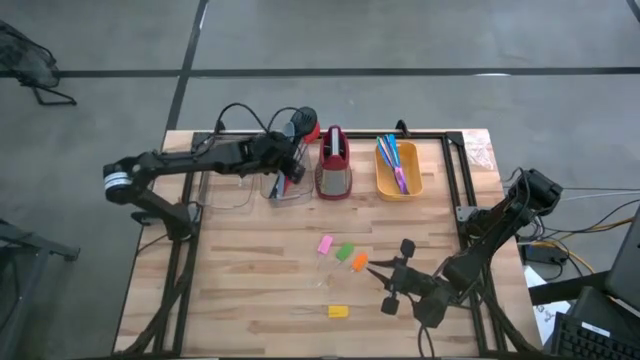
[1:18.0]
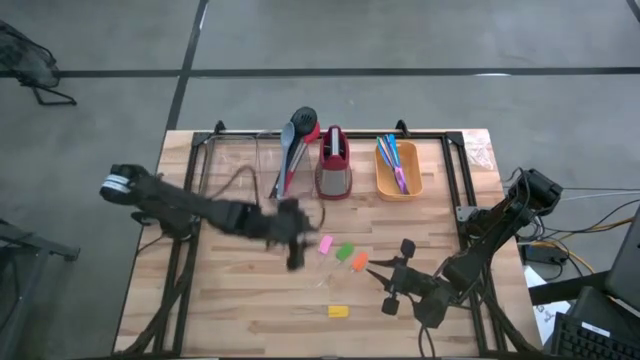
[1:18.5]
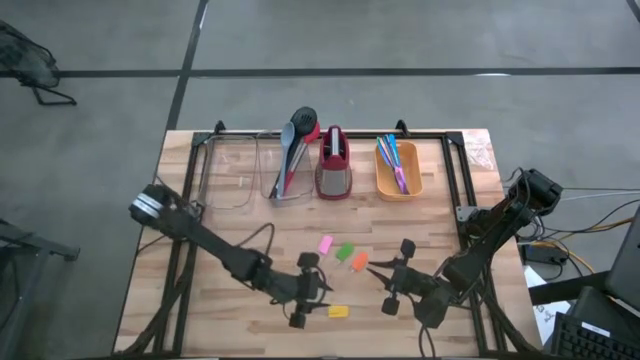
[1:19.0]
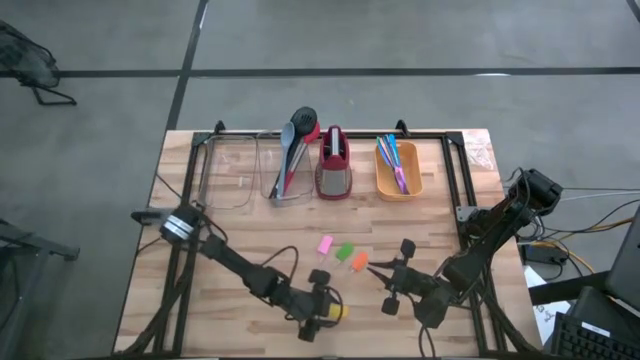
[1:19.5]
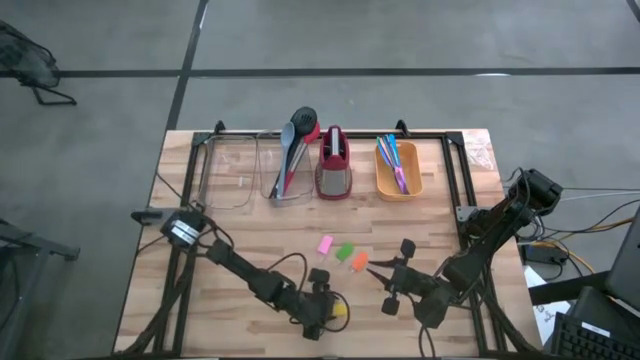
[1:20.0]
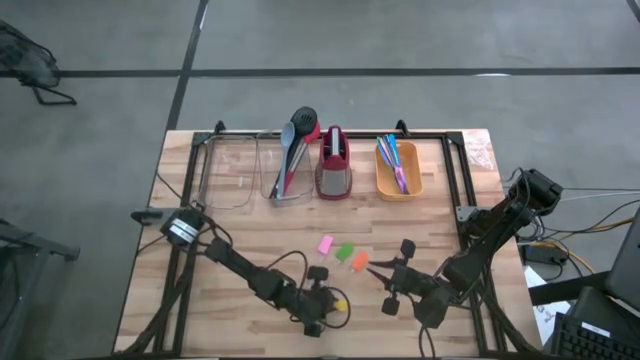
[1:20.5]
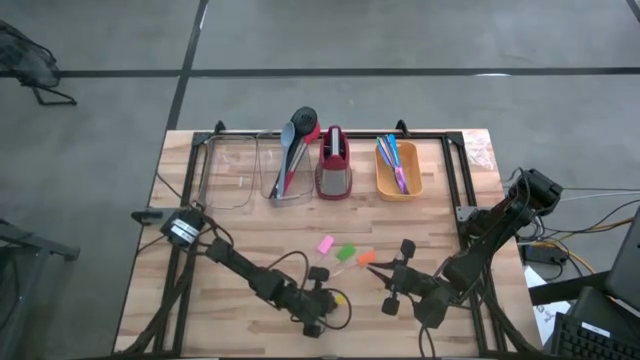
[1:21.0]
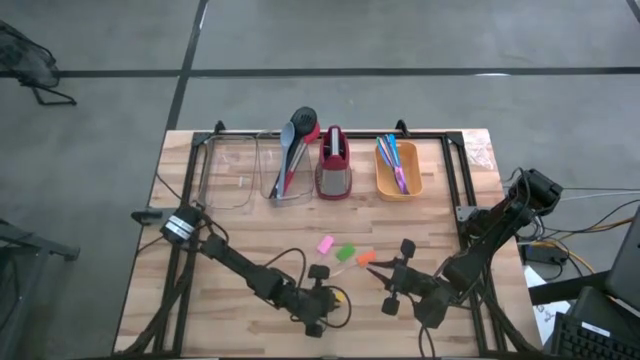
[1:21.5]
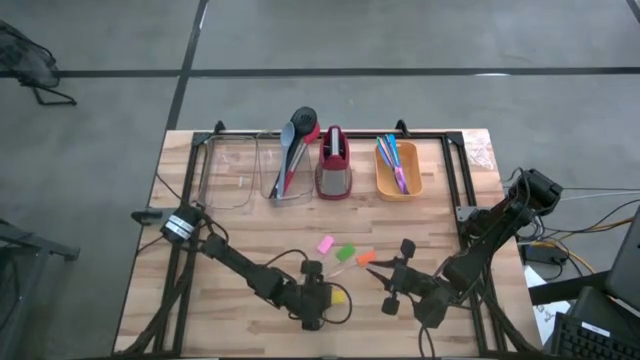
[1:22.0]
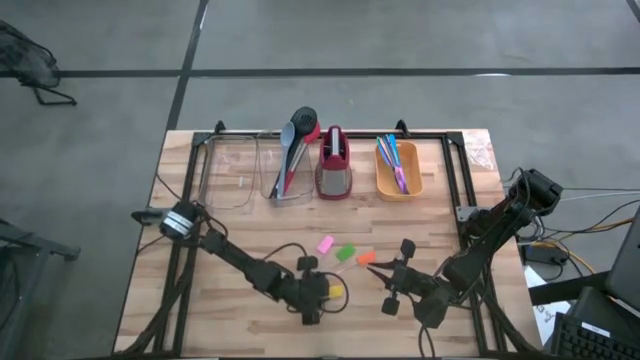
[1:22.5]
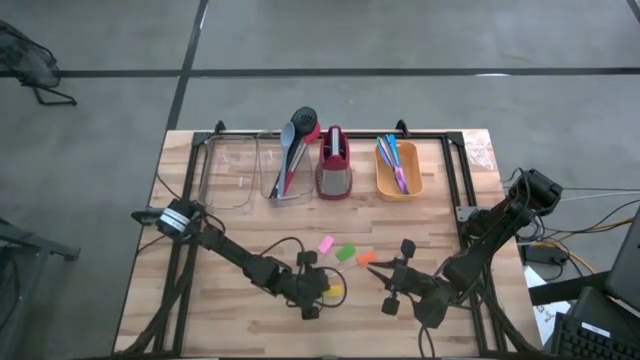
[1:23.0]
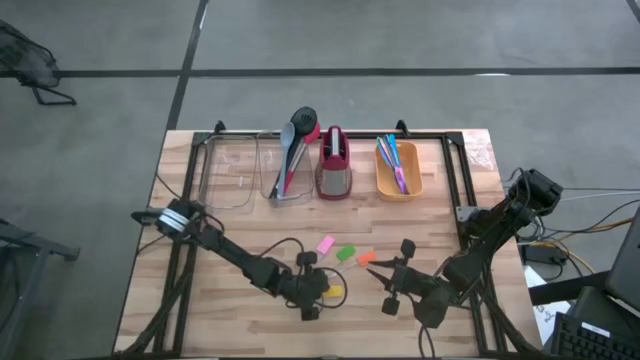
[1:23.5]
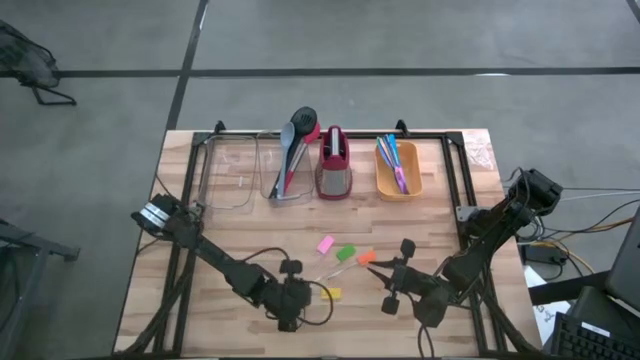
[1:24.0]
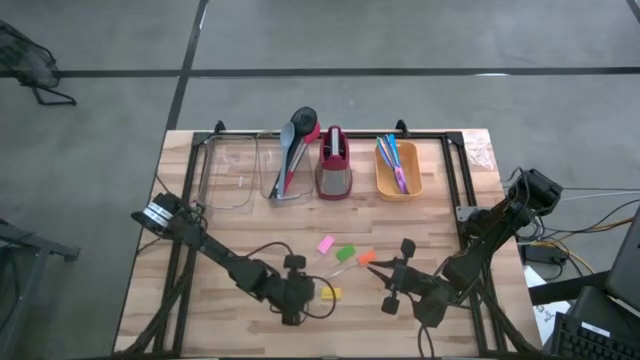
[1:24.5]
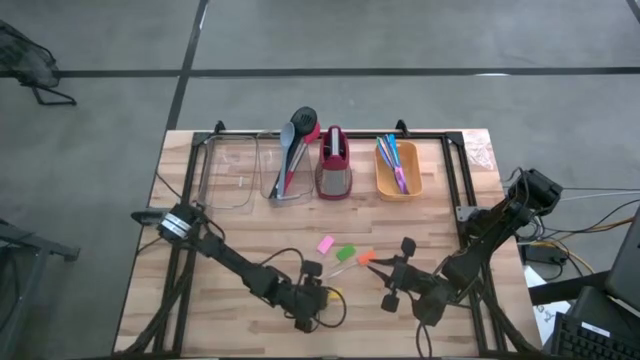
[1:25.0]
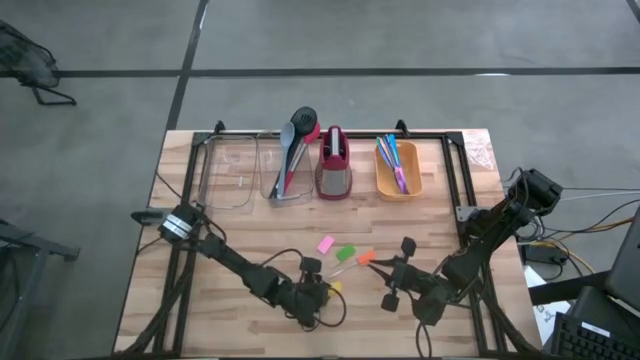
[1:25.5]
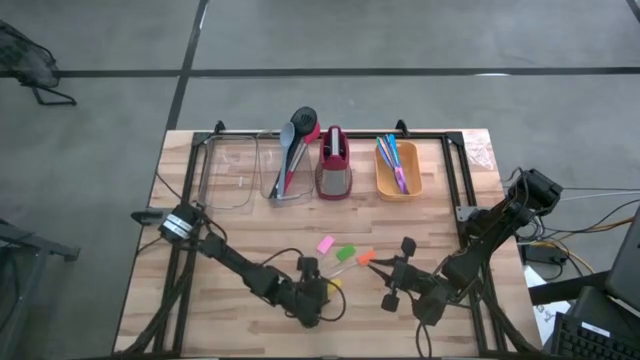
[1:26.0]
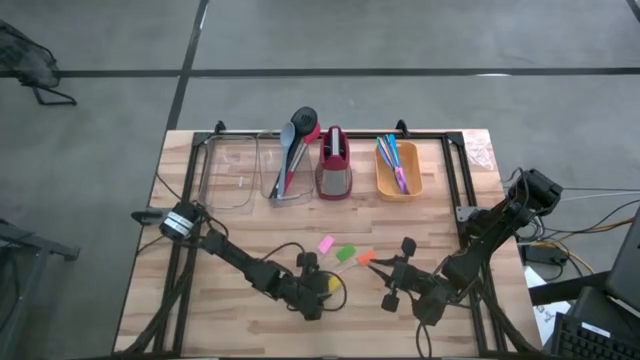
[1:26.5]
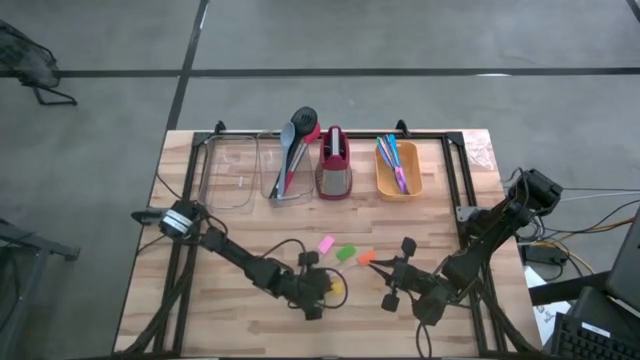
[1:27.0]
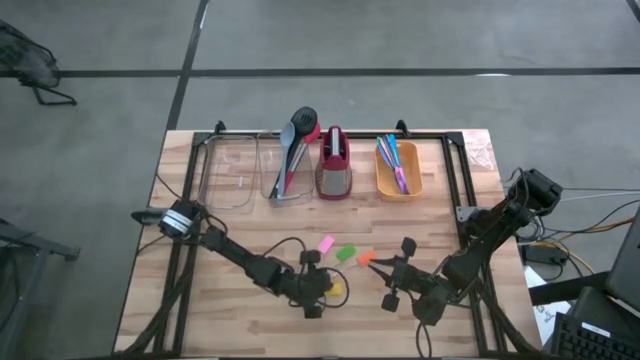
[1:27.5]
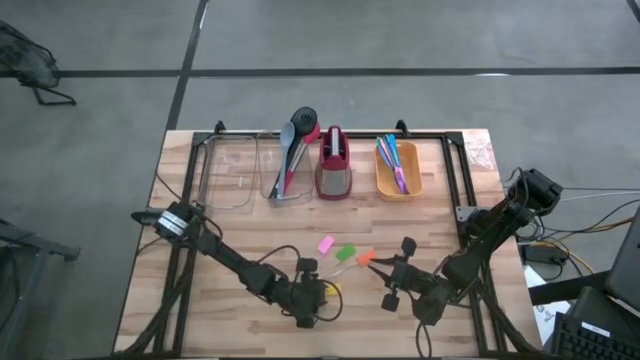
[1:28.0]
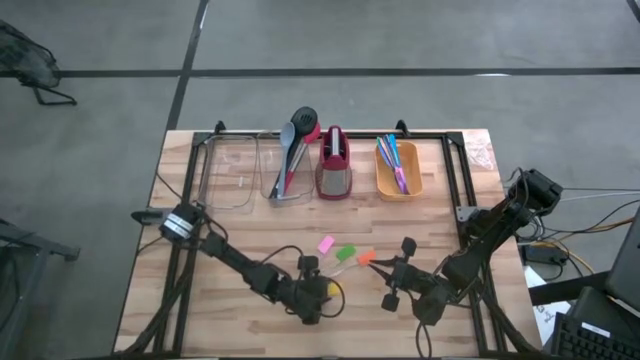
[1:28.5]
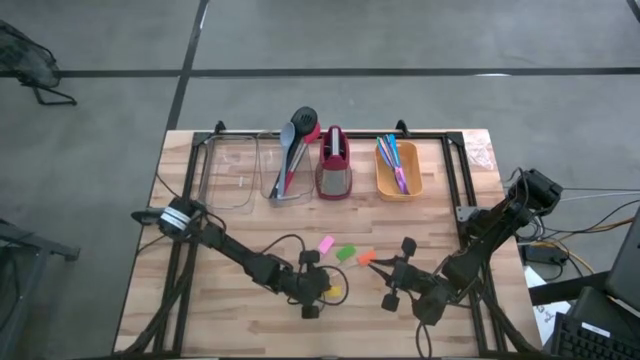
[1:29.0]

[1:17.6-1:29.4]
Task: Pick & Place Kitchen Items
Put the yellow spatula into the left transparent bin

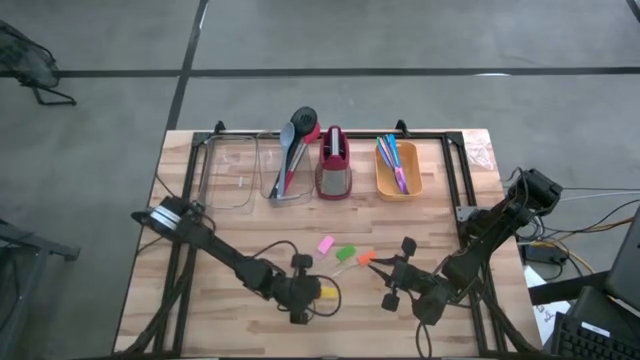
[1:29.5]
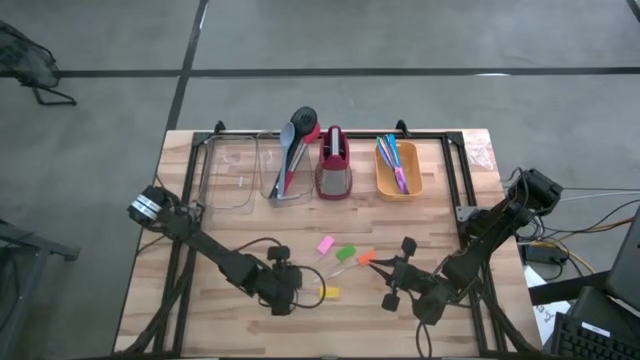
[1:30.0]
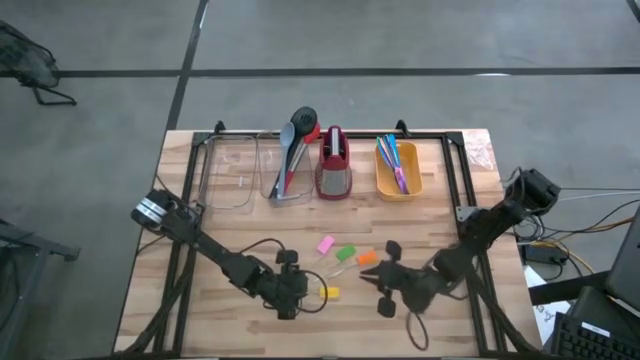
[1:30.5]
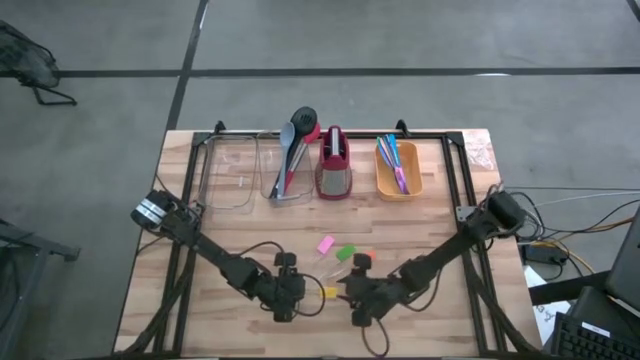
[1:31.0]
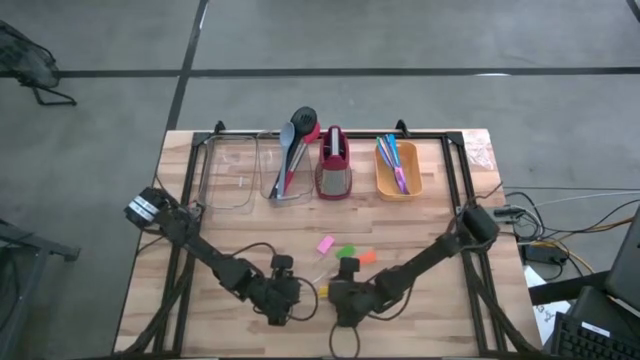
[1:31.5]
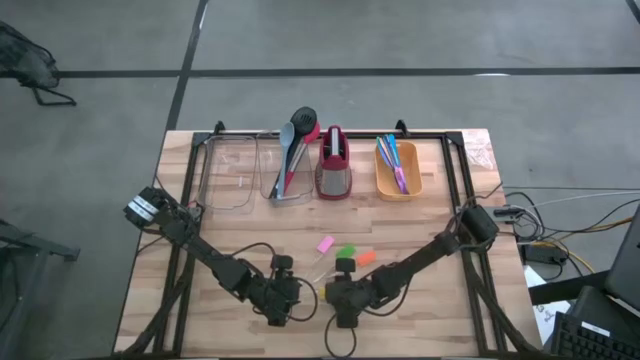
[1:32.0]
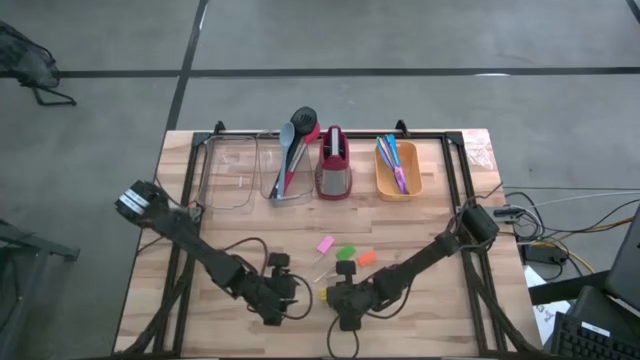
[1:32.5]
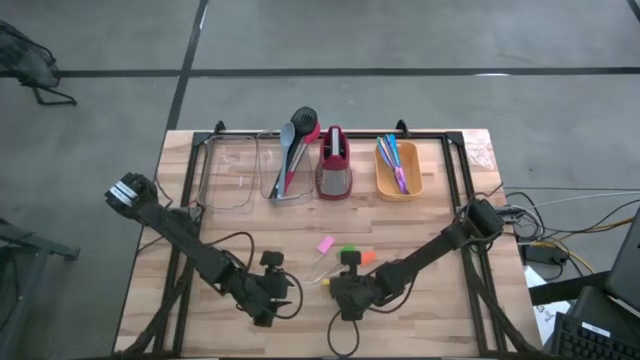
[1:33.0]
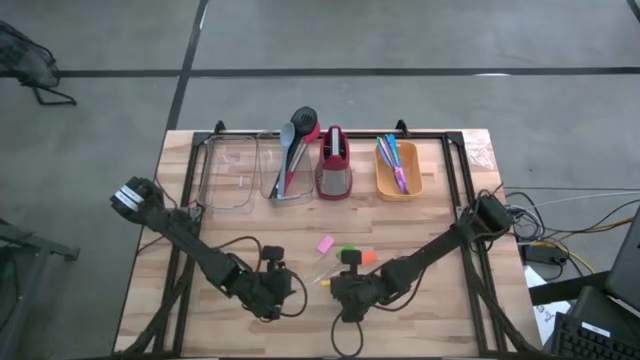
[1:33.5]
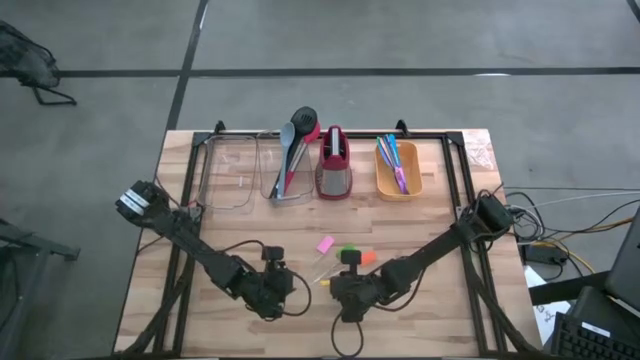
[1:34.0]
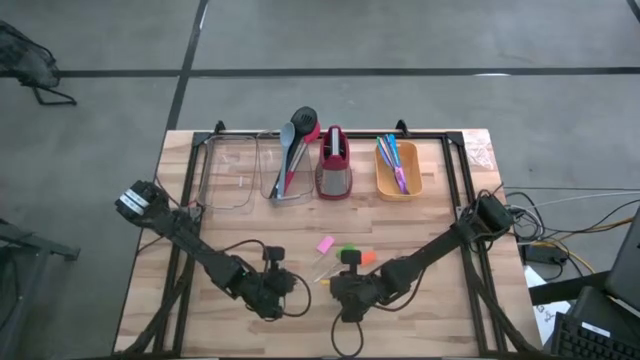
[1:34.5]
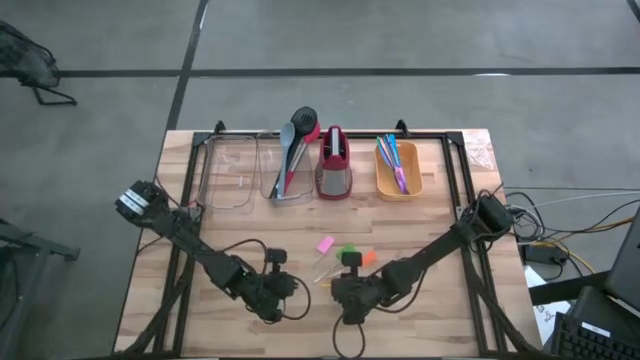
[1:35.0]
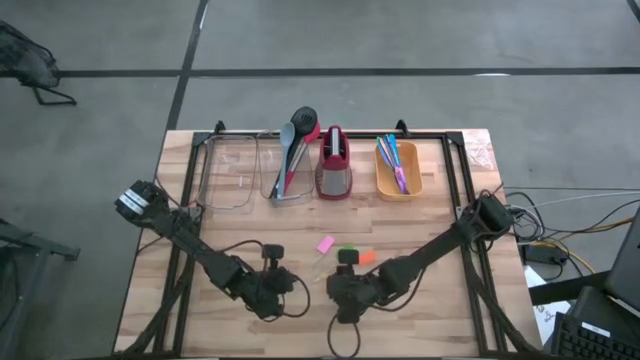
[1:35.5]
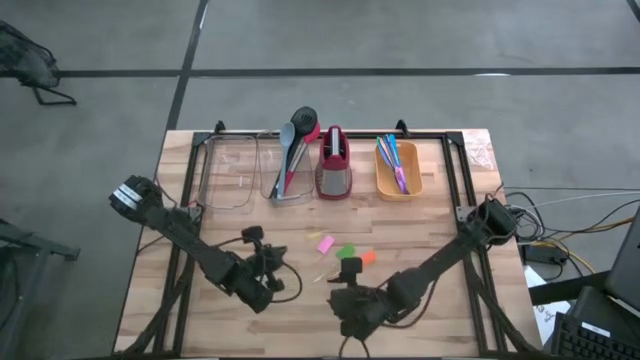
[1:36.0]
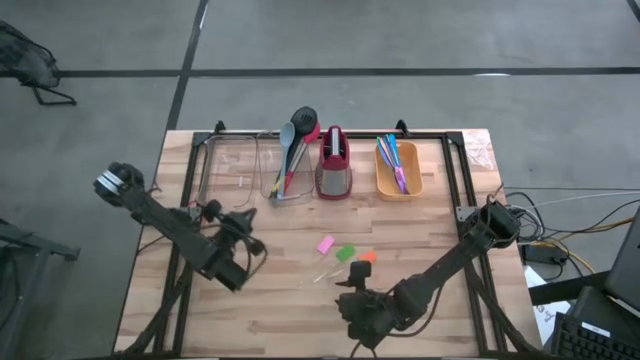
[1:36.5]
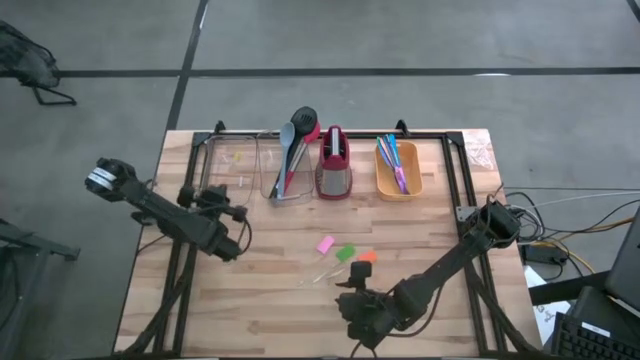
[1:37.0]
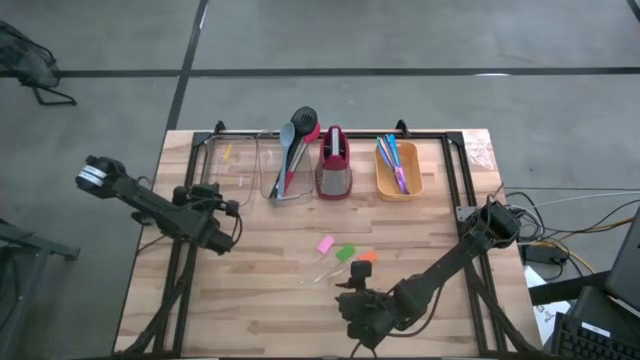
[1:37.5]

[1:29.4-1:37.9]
Put the yellow spatula into the left transparent bin

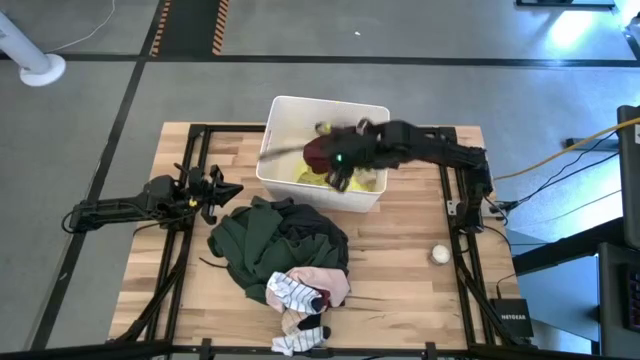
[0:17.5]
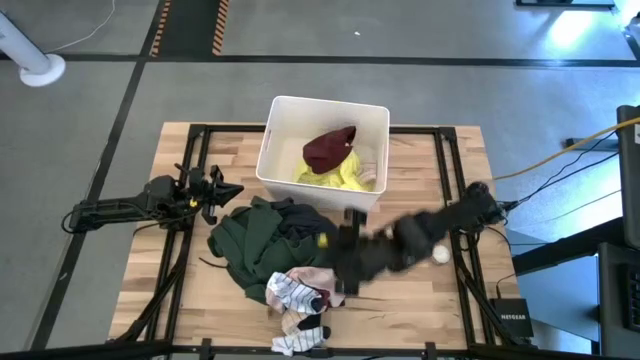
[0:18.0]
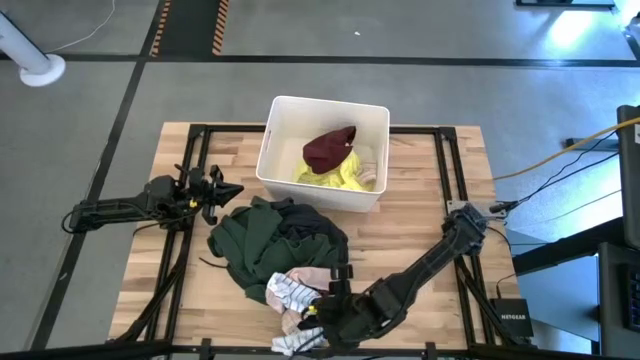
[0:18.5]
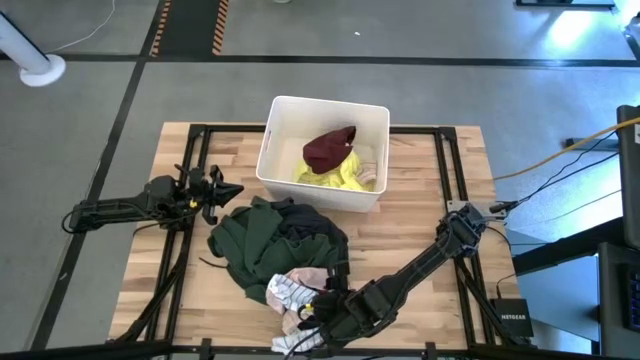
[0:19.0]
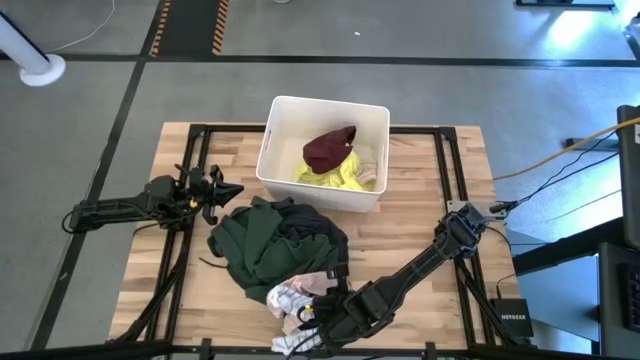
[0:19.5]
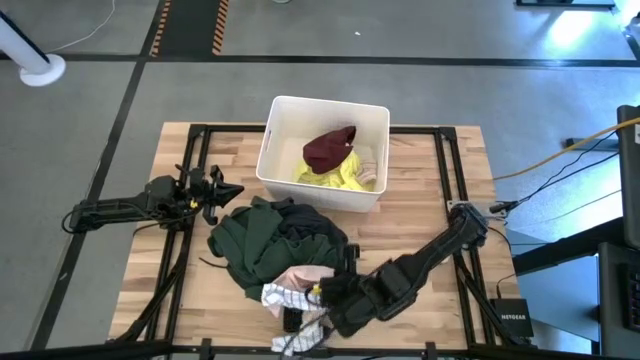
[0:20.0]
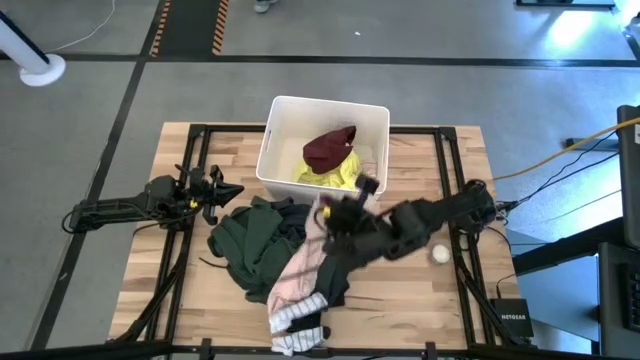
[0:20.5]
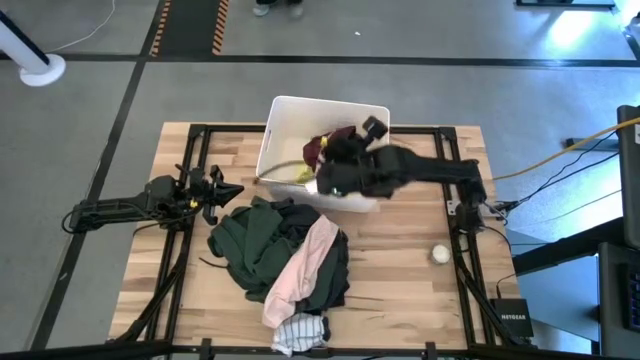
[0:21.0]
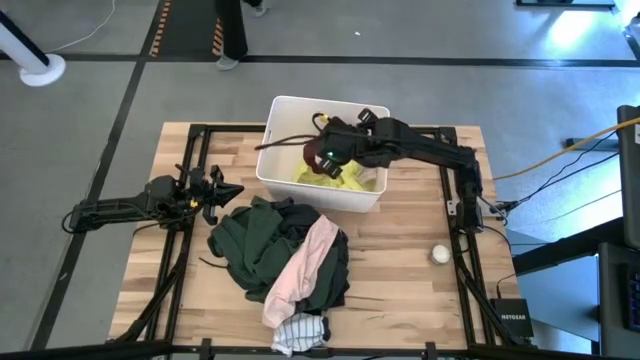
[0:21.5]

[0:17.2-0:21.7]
Task: Sort clothes
Put the pink stripe sock into the white bin
